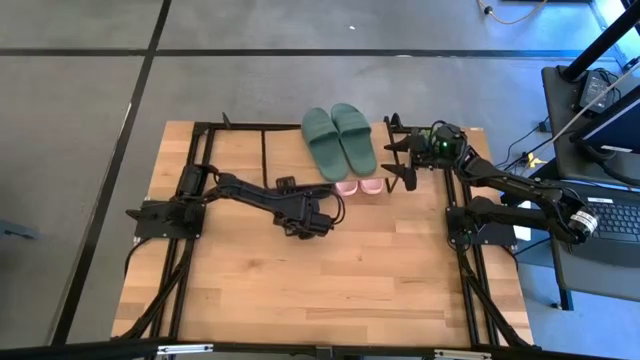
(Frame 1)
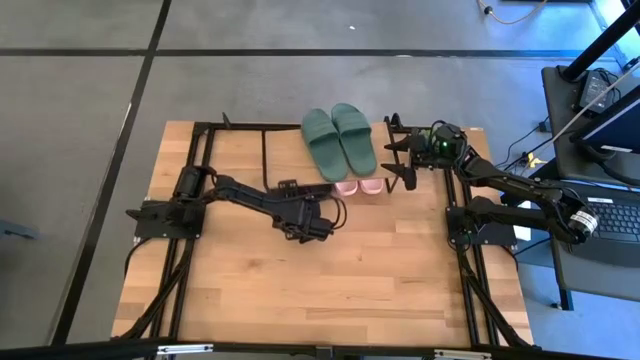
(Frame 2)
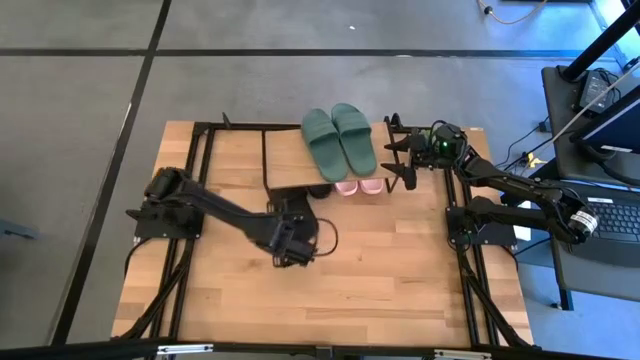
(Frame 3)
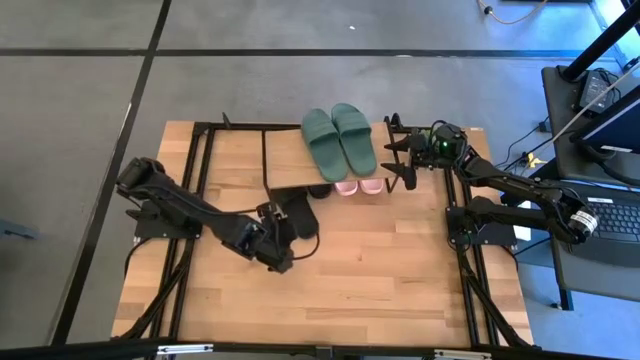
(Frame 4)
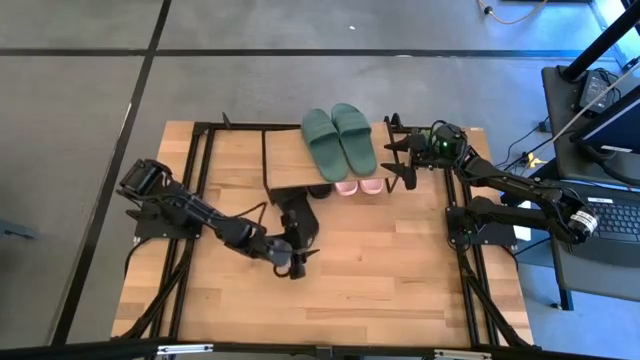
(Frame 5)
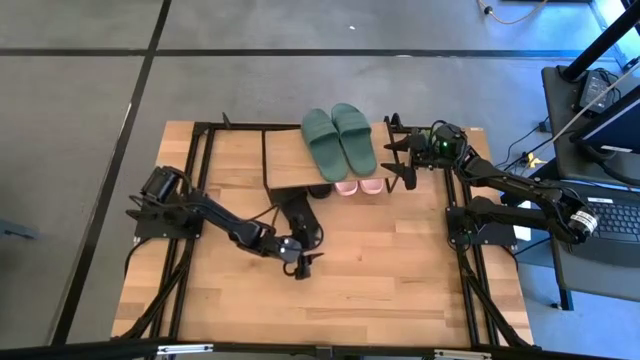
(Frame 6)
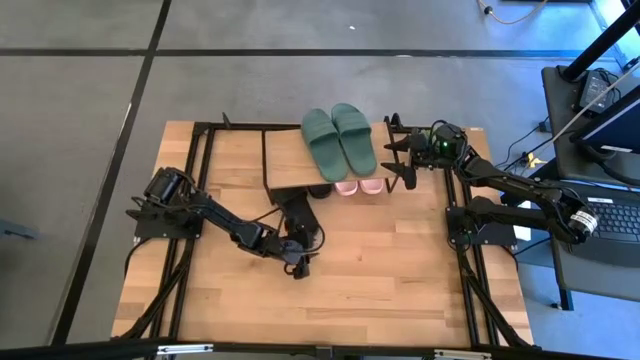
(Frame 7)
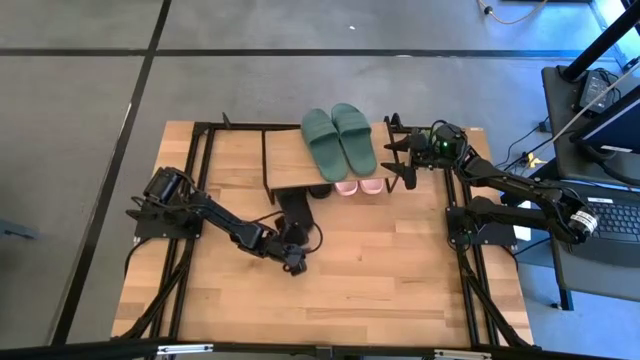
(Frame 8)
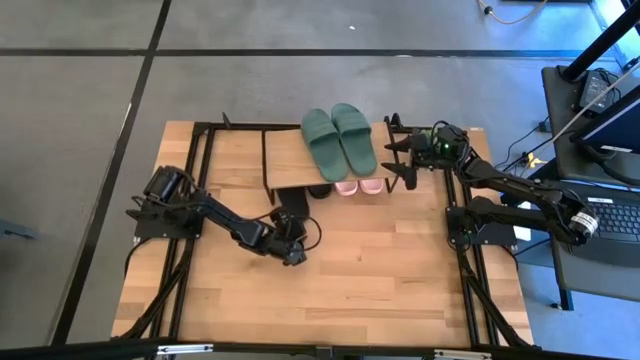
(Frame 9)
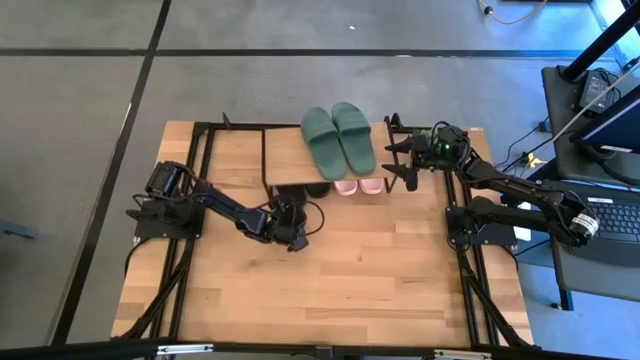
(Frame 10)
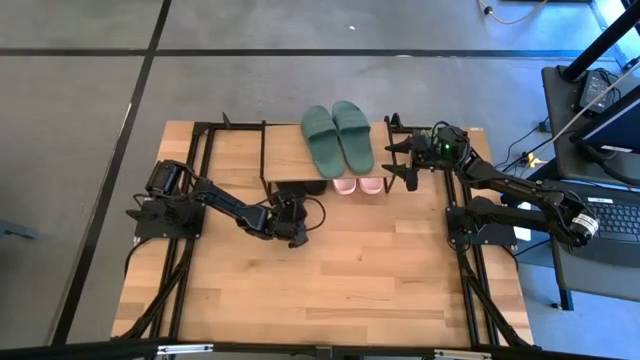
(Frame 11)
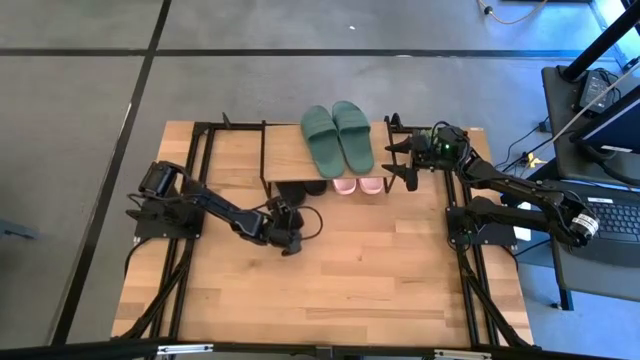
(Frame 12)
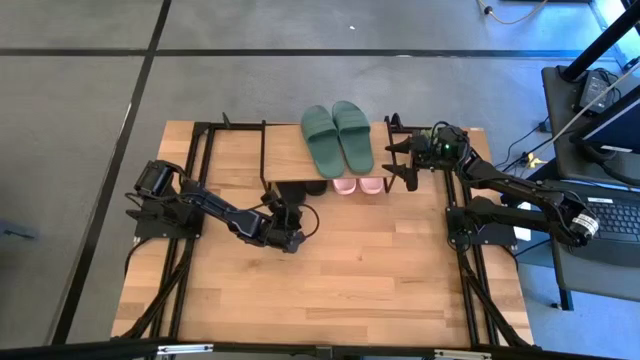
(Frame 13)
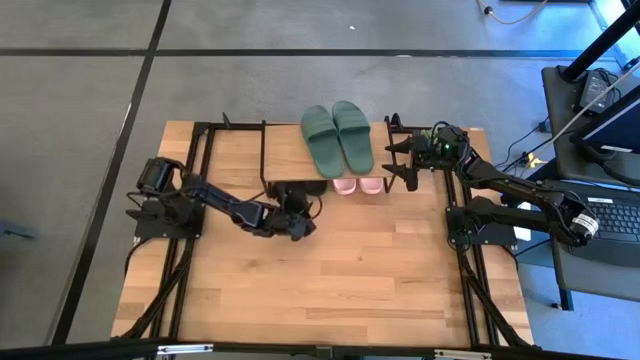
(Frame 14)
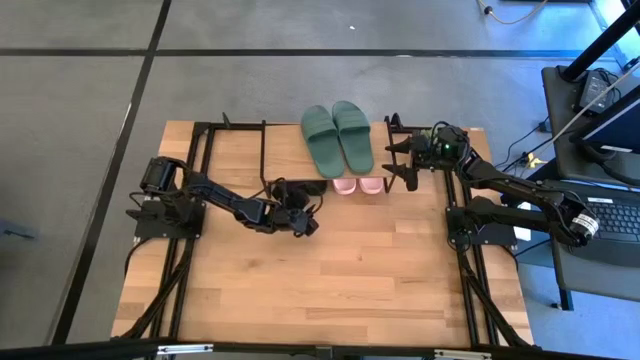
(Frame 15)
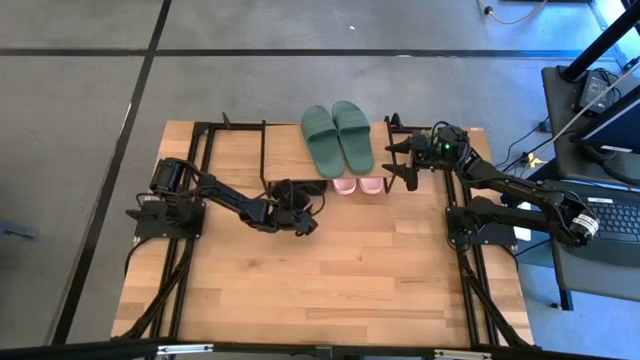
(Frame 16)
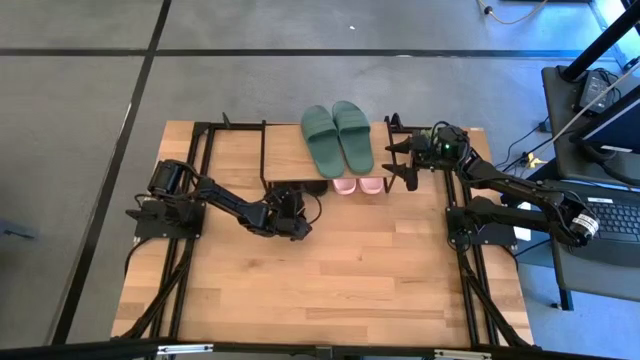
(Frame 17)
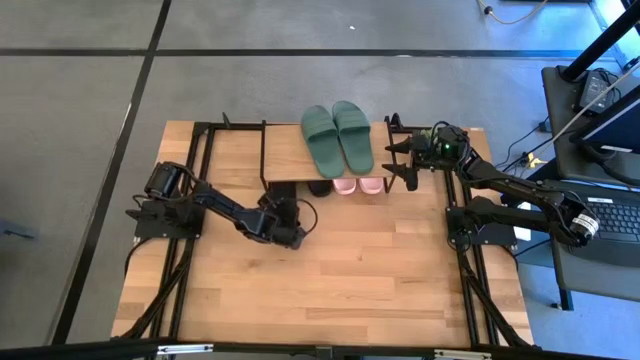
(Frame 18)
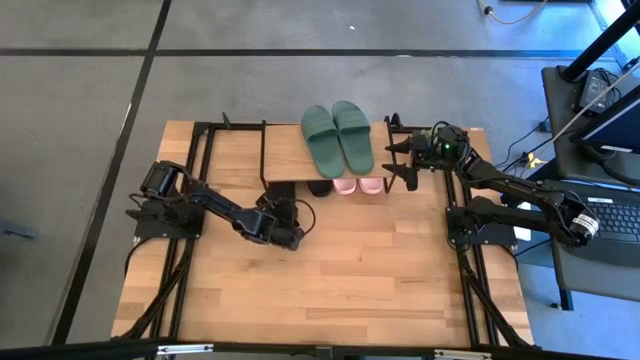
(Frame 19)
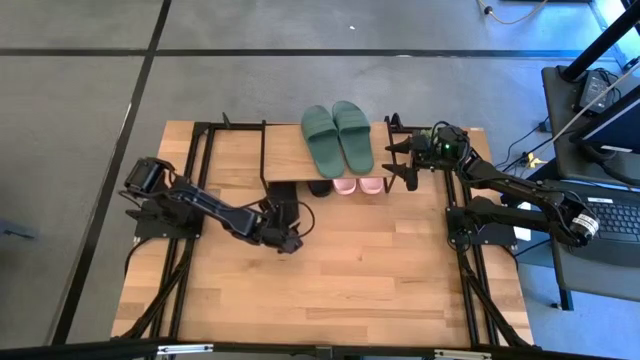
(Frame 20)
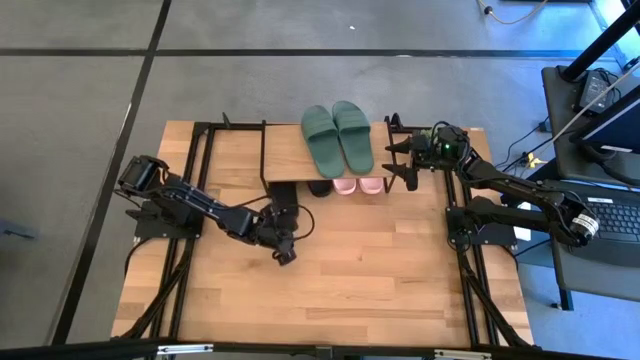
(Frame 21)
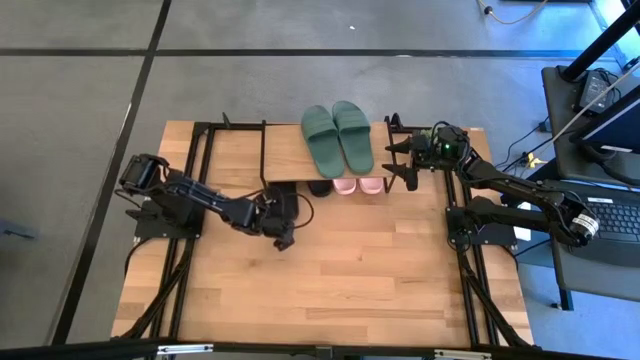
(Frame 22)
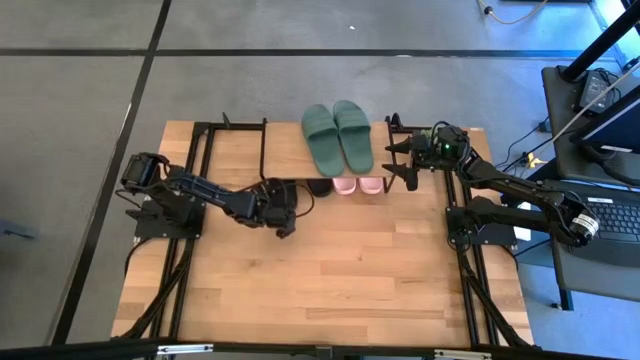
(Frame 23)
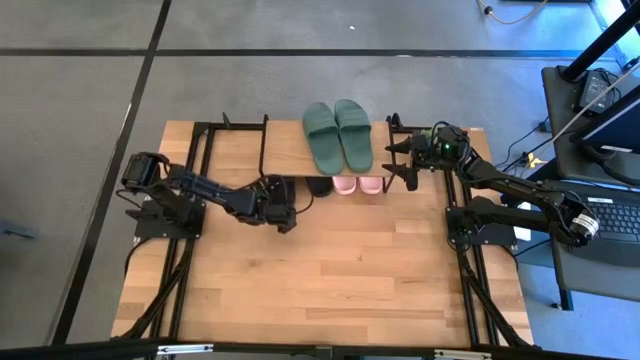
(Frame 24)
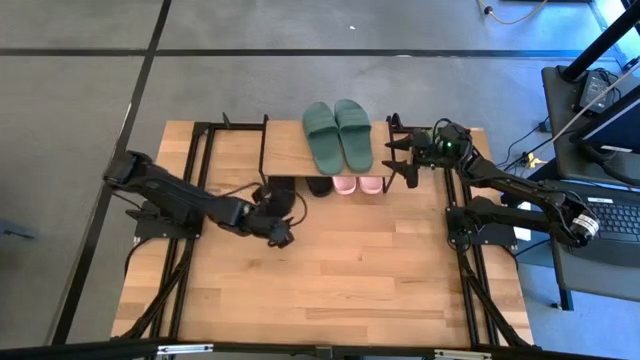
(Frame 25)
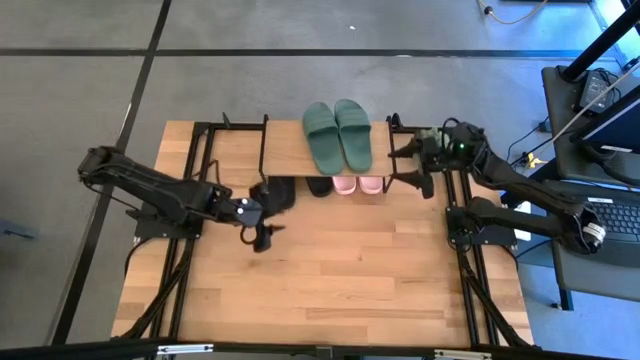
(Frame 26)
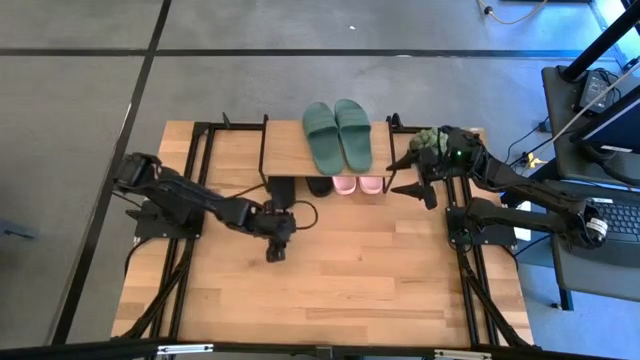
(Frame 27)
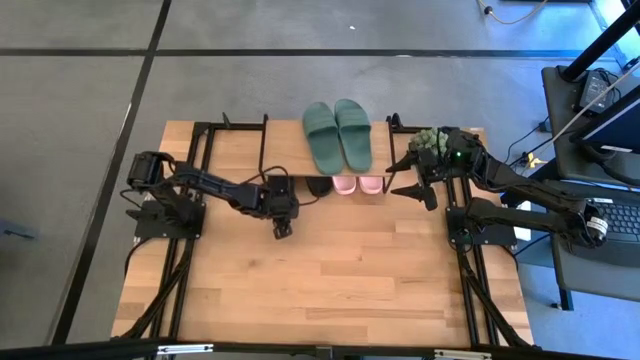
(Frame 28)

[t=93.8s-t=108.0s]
Task: Pick and place slides into the shelf
Put the black slide under the shelf

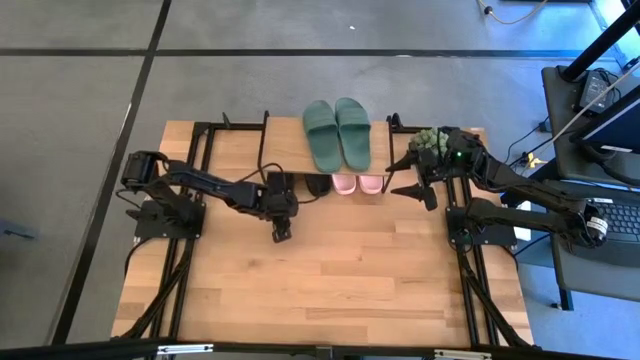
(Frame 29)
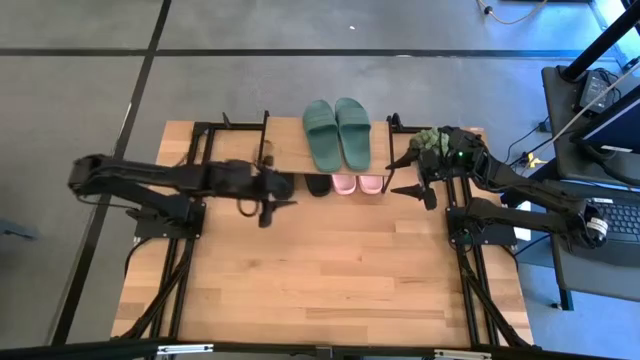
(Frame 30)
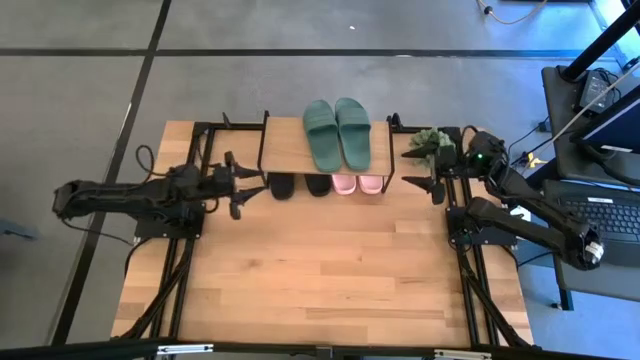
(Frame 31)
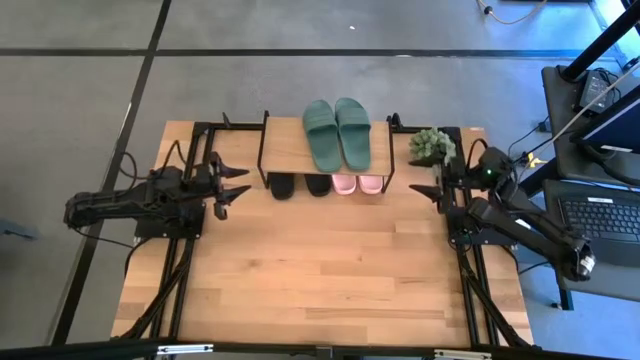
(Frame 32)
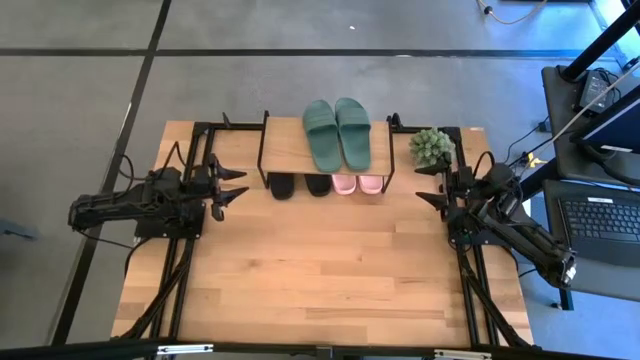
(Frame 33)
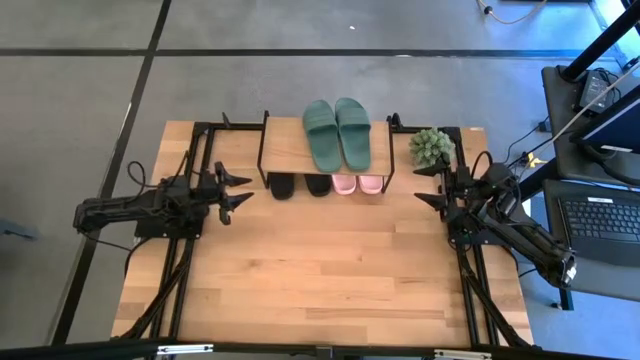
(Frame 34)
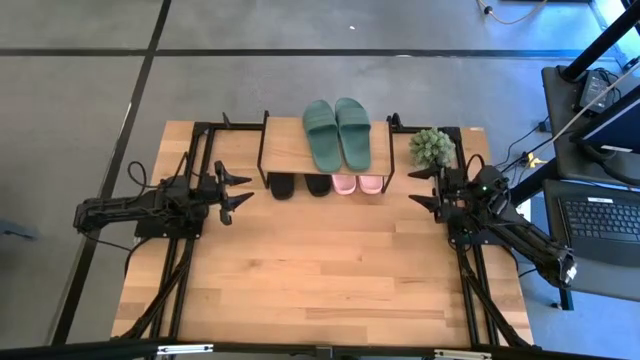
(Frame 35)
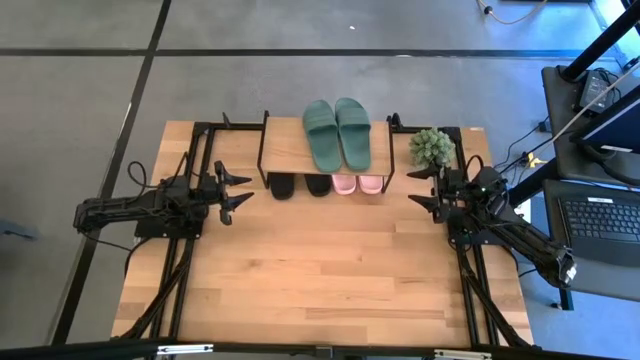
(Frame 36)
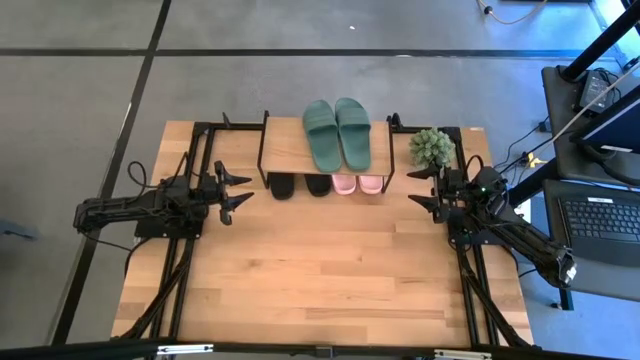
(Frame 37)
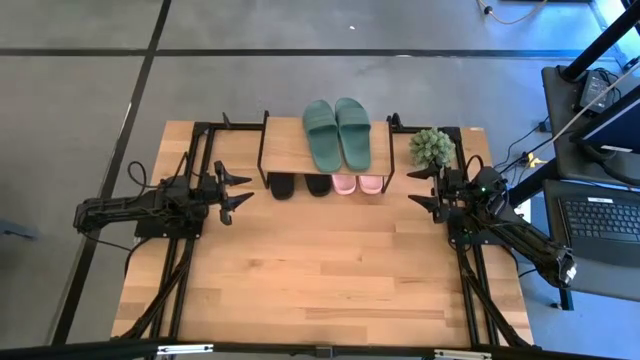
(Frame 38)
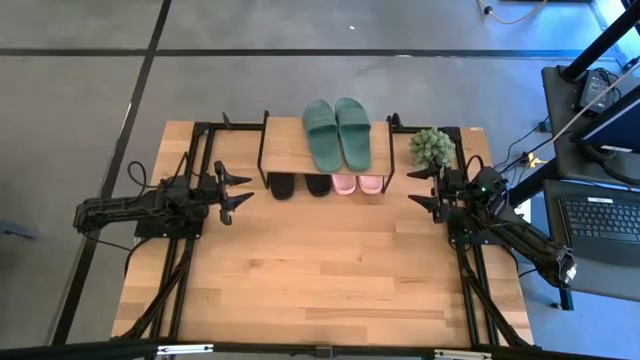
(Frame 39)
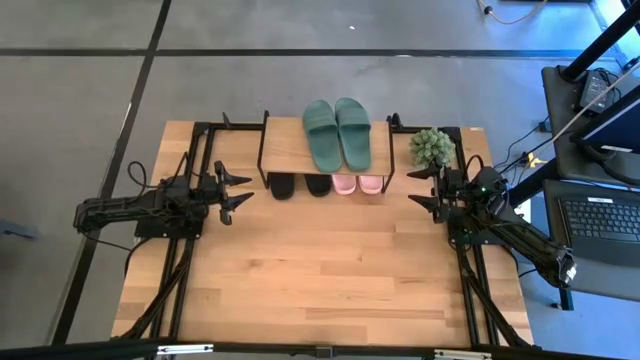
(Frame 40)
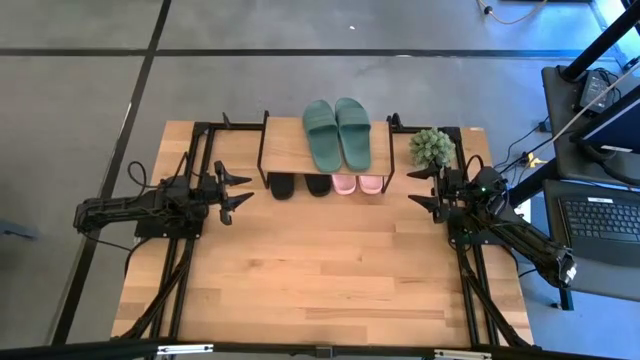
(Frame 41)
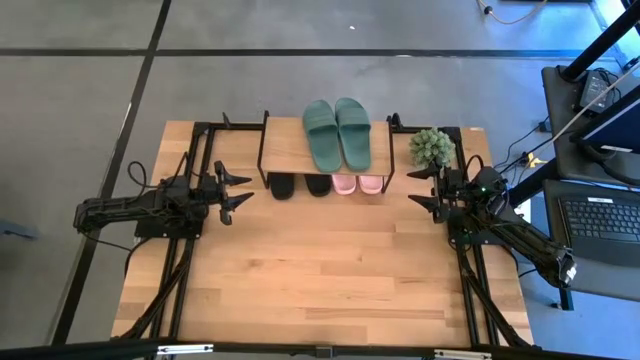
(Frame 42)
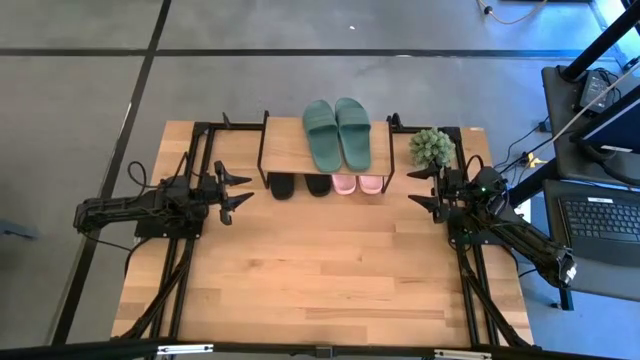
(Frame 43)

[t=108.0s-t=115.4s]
Return to Home Position
